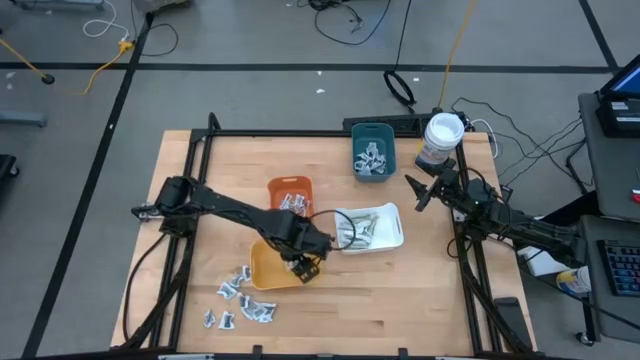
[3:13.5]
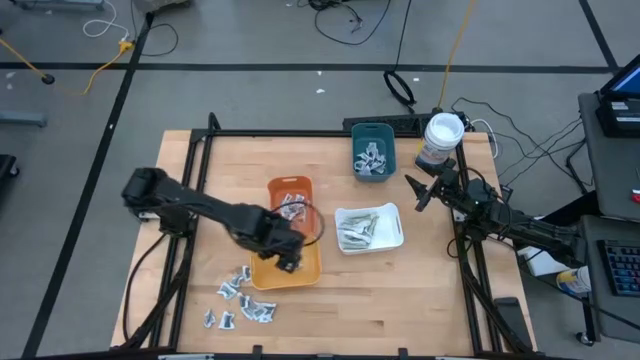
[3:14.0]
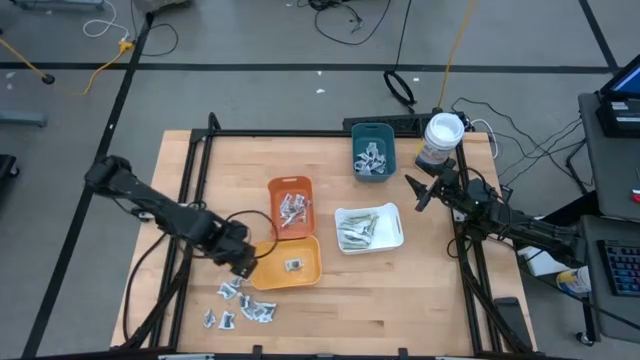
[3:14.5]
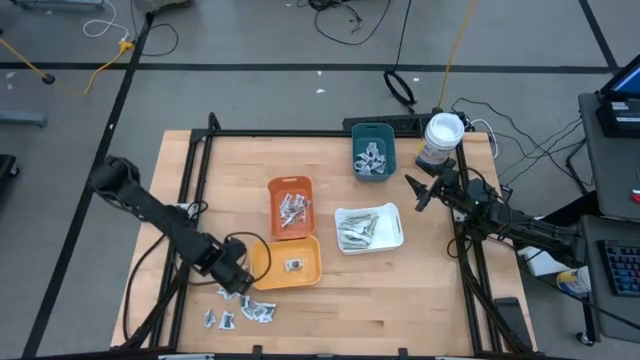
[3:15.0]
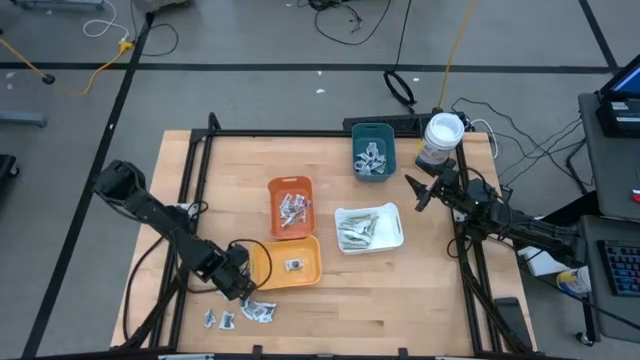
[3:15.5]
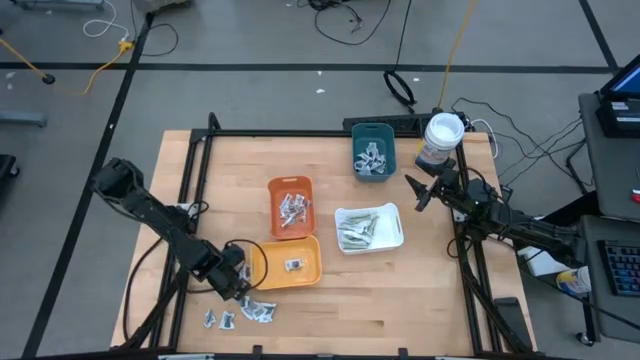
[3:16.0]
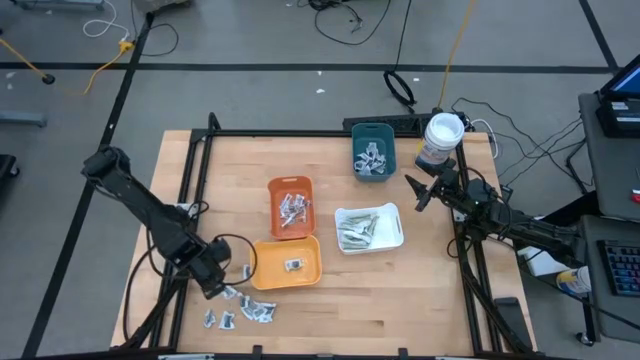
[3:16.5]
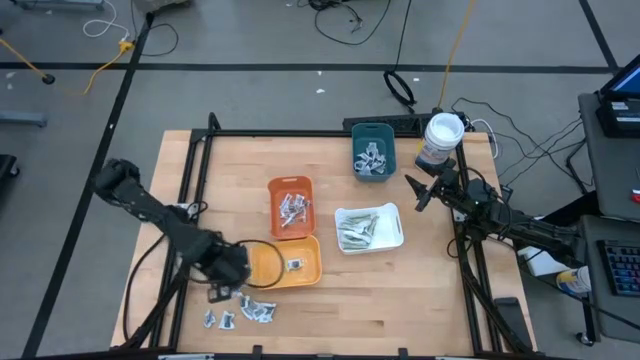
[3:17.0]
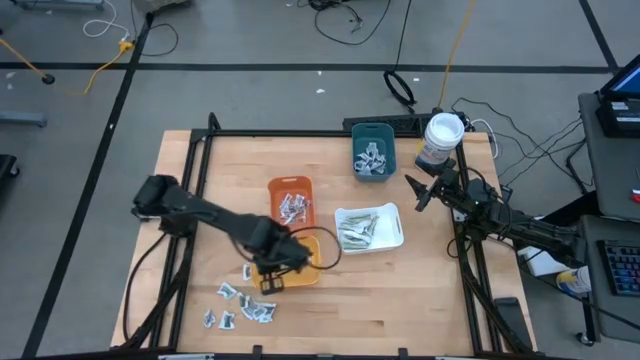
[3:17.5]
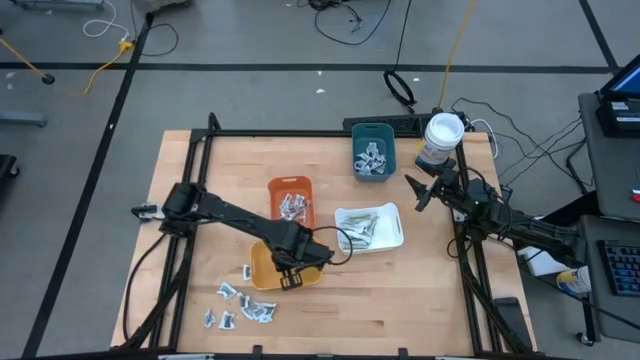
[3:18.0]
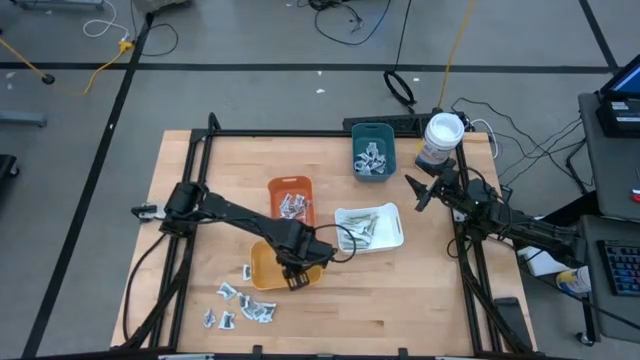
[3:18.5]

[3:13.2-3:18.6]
Task: Pick & Place First Aid Supplies
Put the gray sachet into the yellow bin

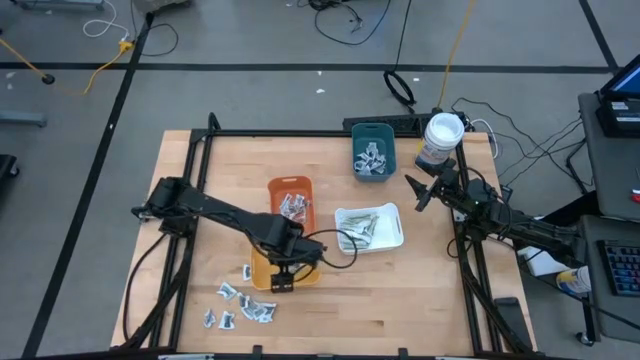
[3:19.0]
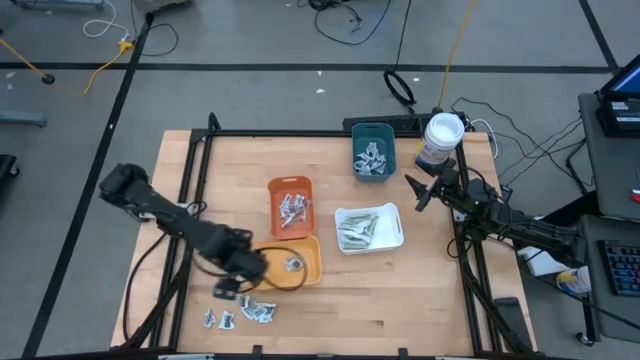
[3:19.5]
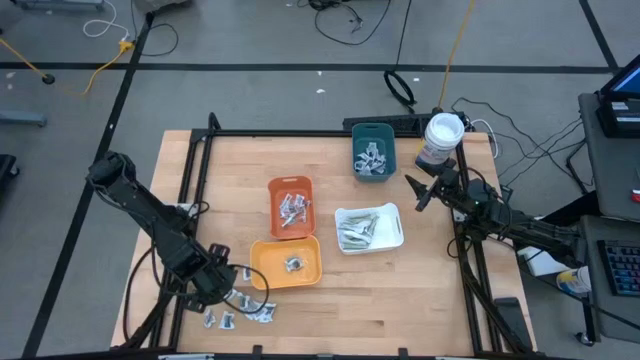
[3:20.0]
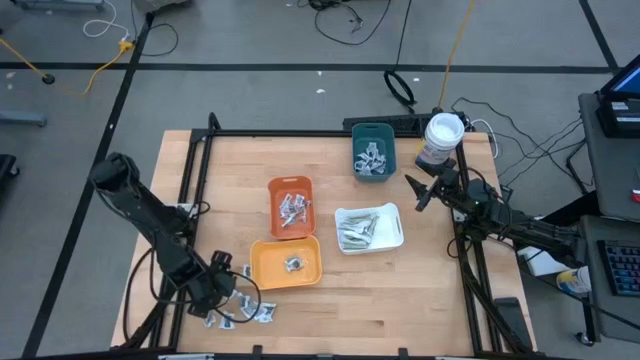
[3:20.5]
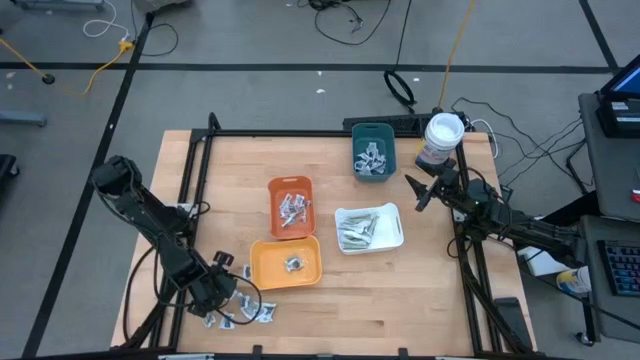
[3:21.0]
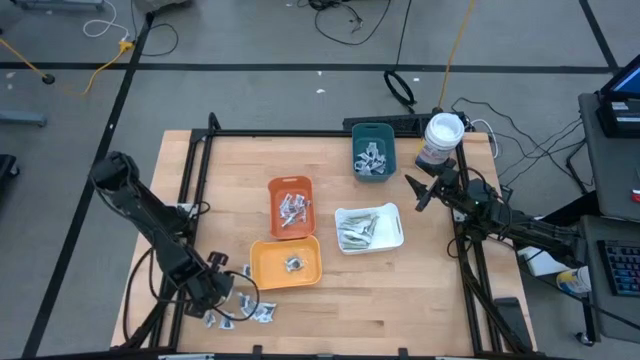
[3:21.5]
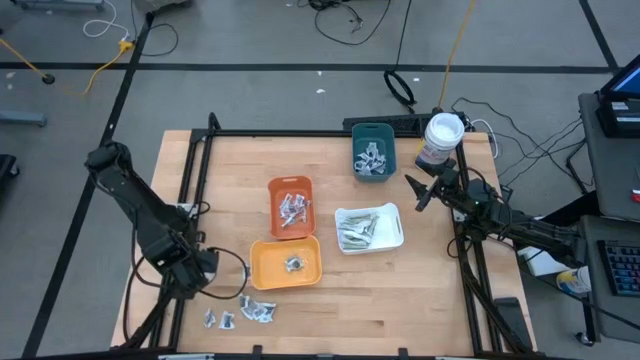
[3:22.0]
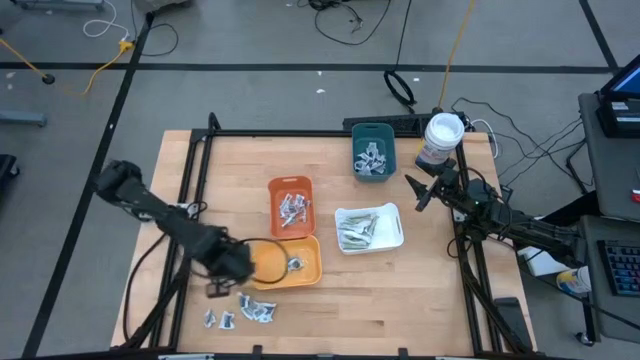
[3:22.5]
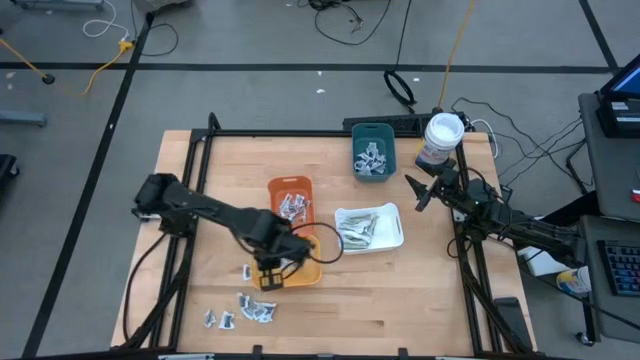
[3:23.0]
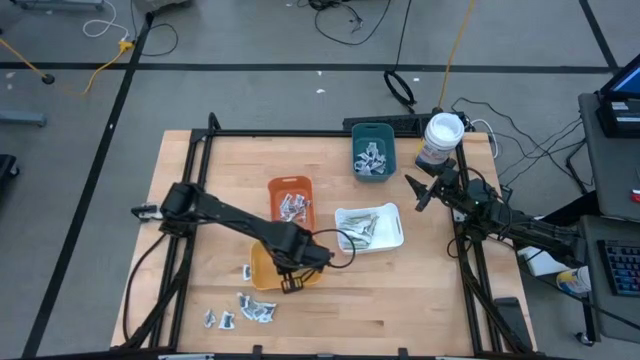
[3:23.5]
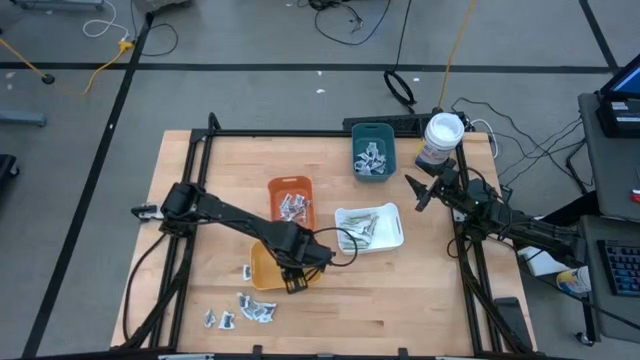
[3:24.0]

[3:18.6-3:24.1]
Put the gray sachet into the yellow bin

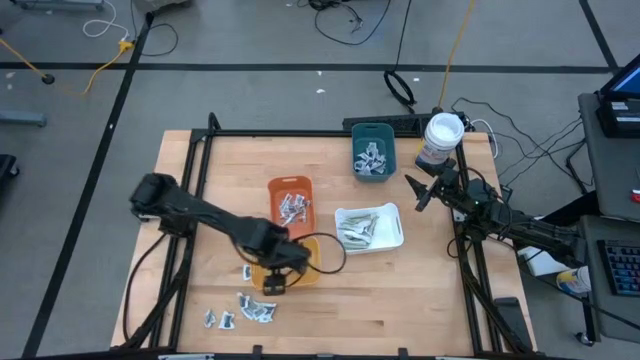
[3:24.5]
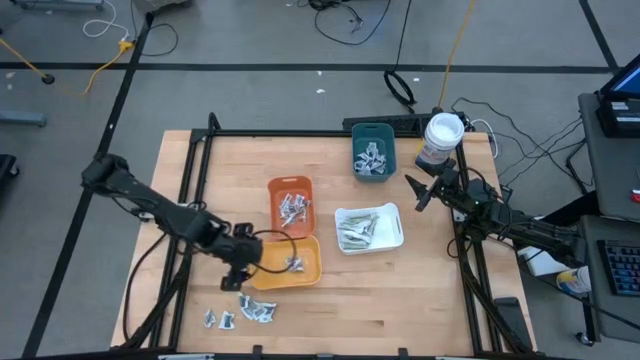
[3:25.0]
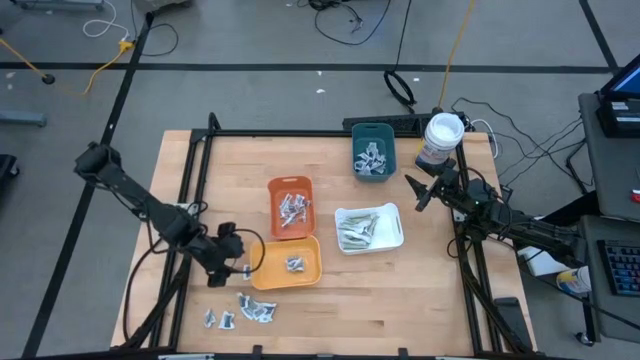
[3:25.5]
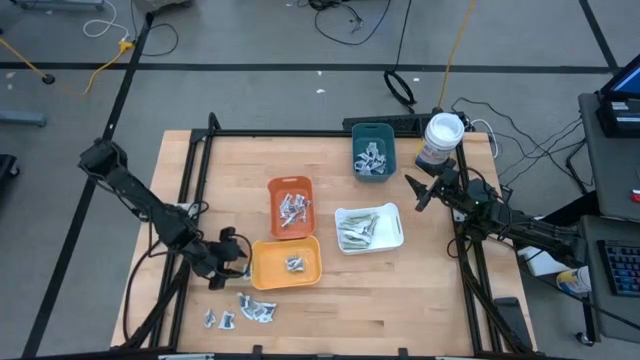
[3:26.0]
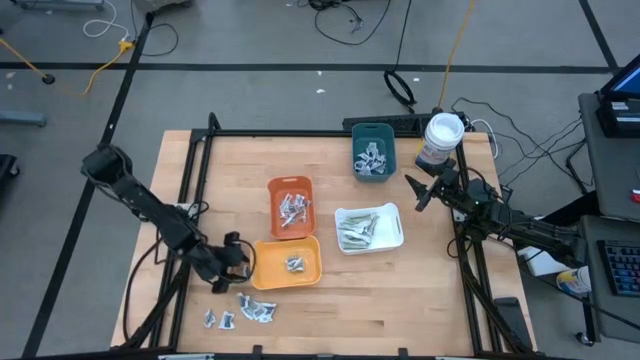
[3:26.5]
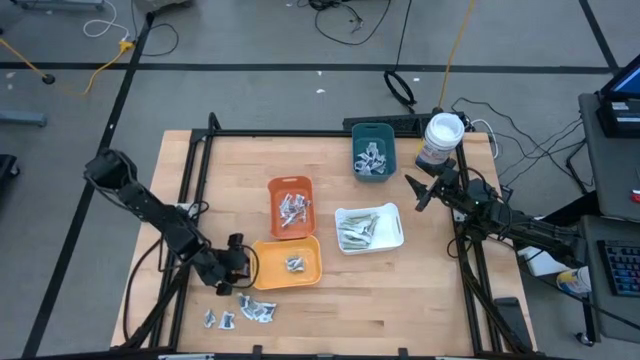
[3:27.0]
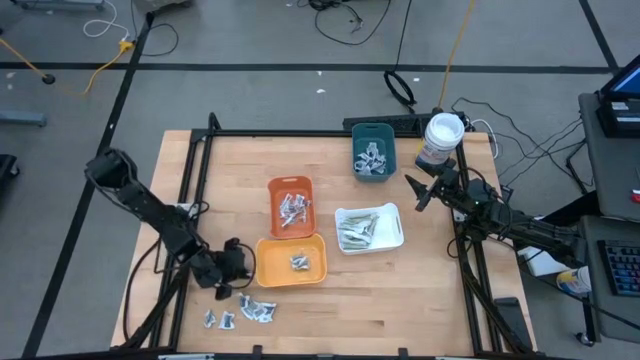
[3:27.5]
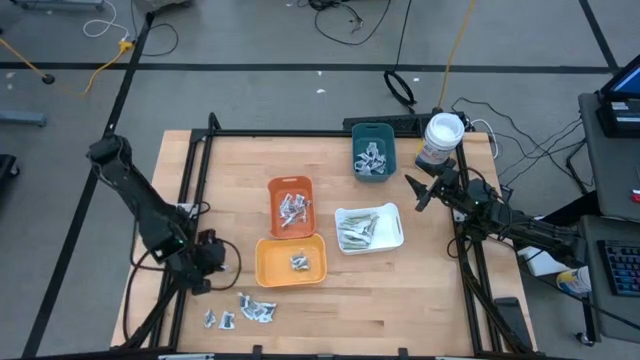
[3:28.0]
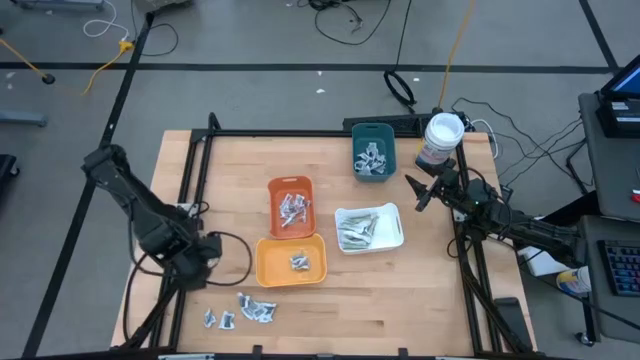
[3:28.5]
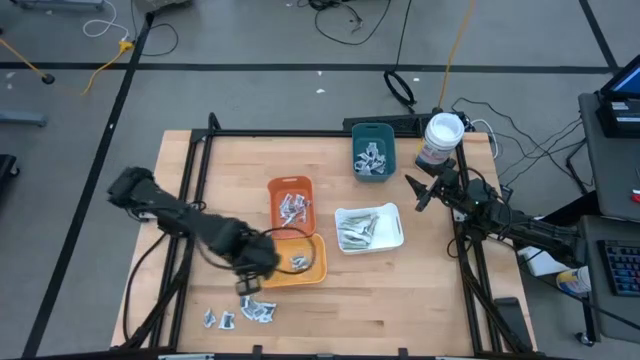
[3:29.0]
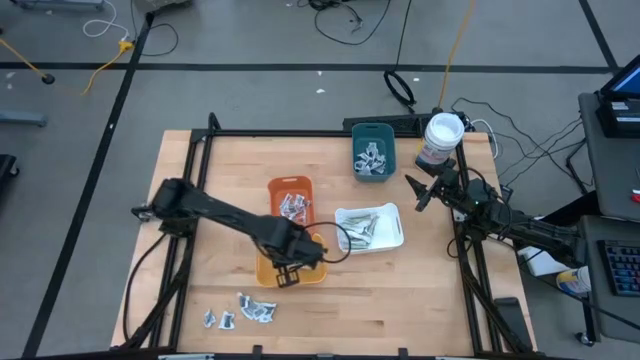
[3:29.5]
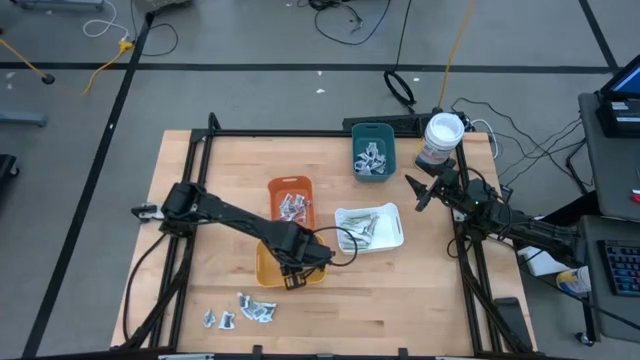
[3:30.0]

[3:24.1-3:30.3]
Put the gray sachet into the yellow bin

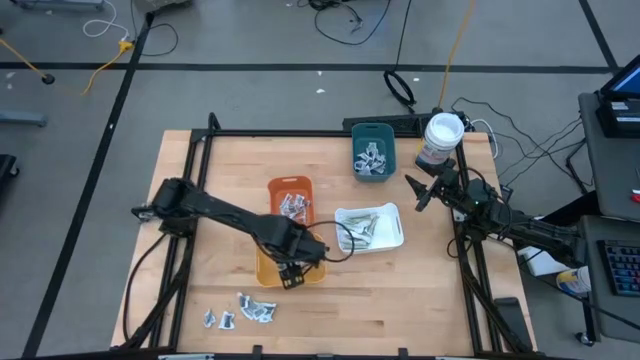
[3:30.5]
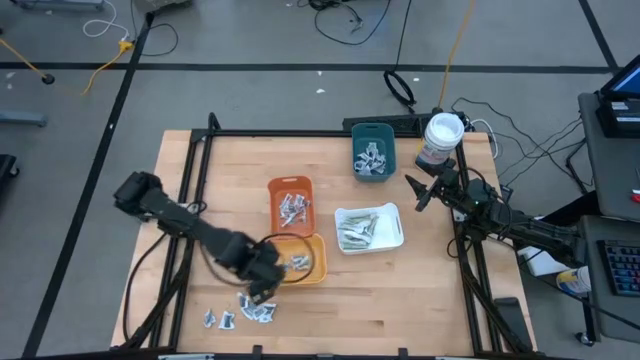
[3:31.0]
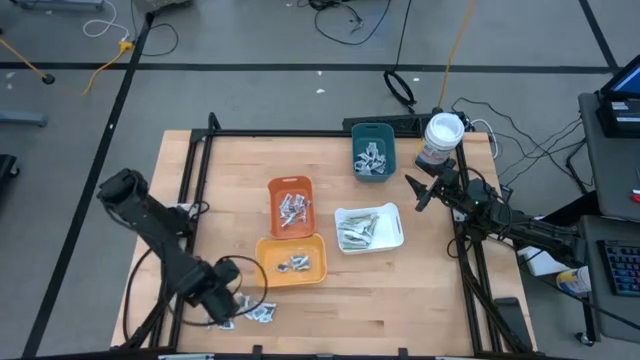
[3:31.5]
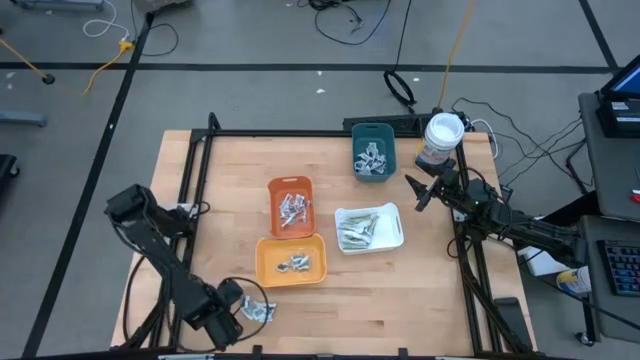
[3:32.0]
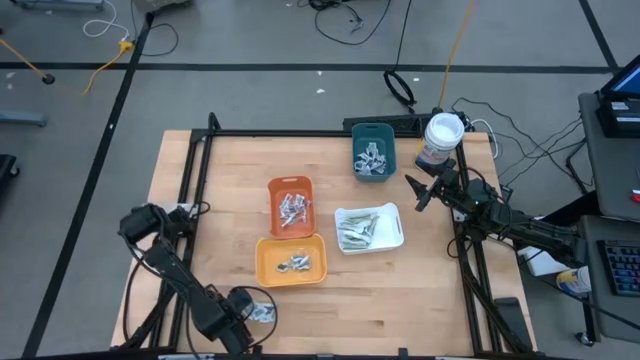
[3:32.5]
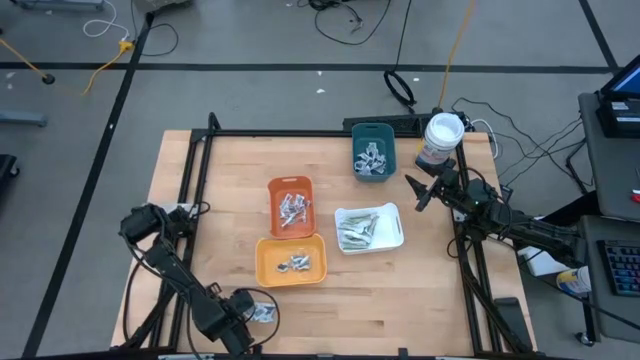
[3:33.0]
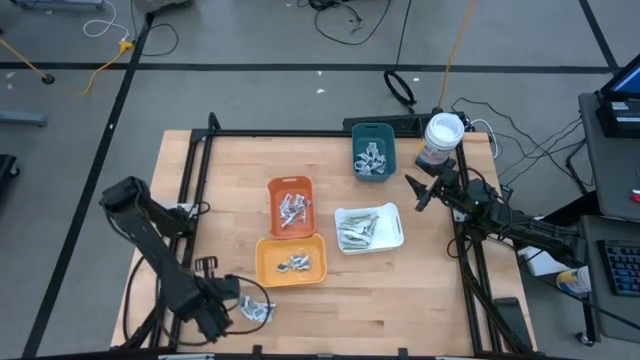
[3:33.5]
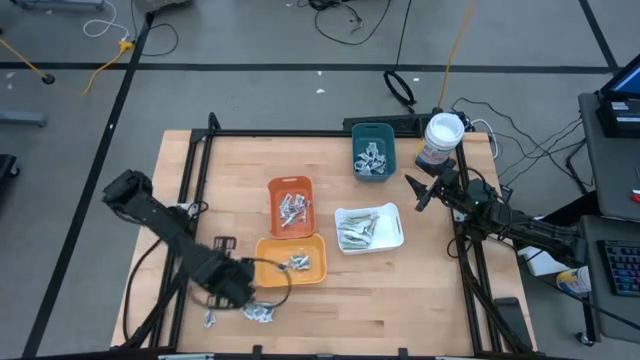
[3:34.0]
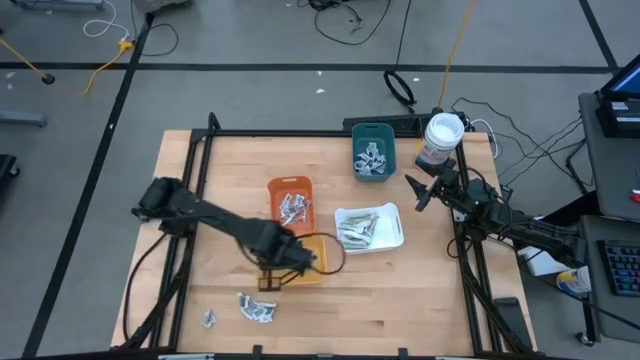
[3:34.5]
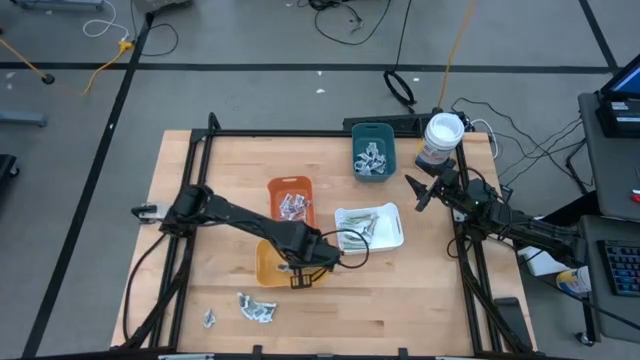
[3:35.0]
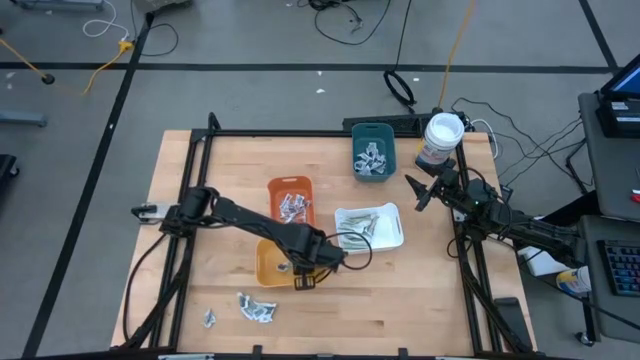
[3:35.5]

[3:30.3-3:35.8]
Put the gray sachet into the yellow bin
